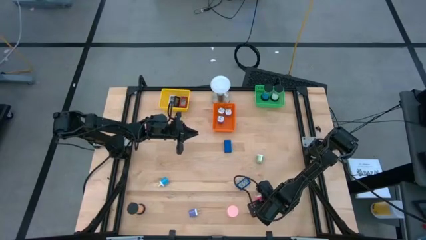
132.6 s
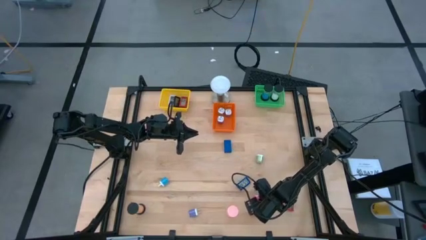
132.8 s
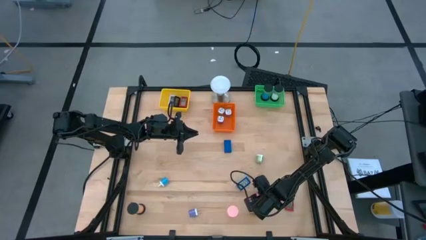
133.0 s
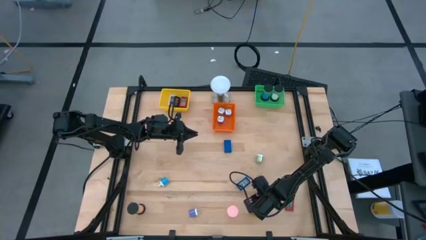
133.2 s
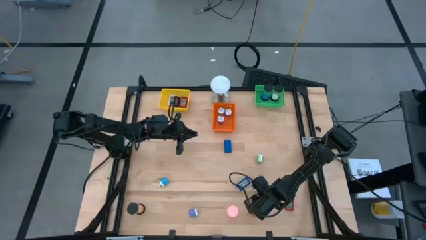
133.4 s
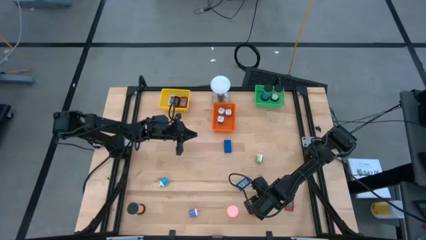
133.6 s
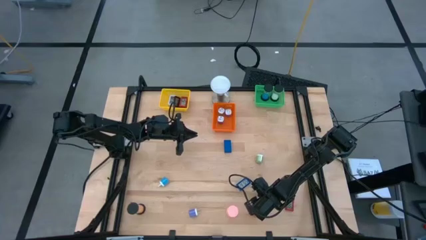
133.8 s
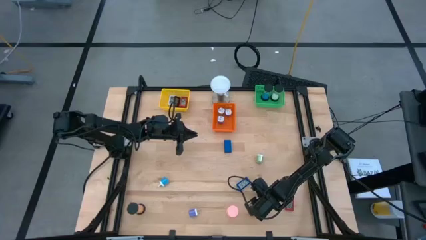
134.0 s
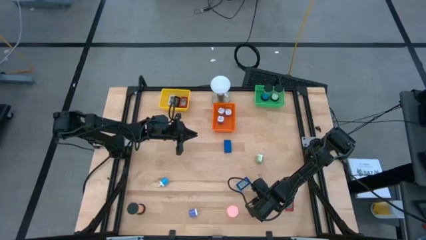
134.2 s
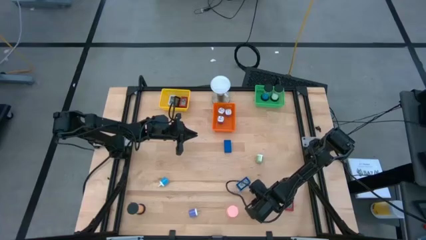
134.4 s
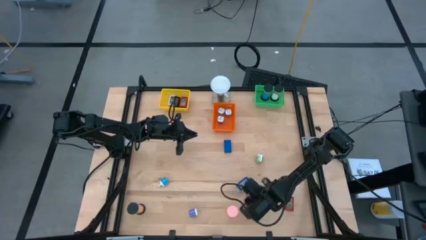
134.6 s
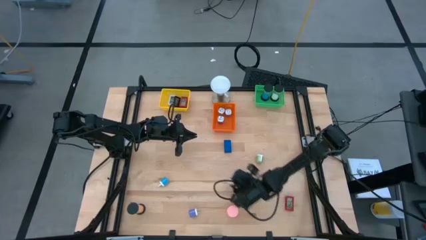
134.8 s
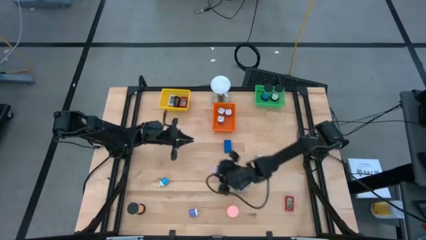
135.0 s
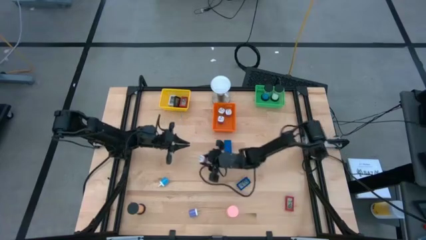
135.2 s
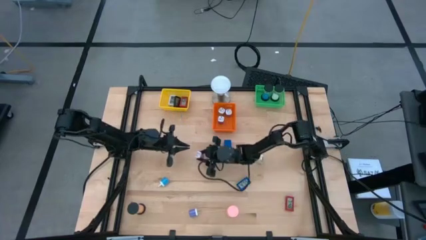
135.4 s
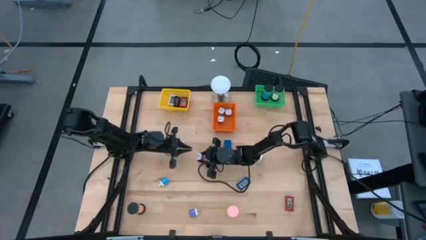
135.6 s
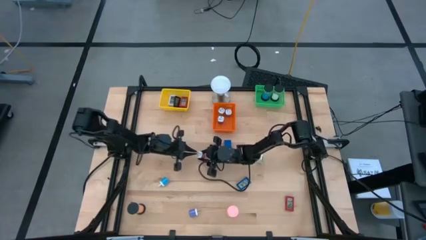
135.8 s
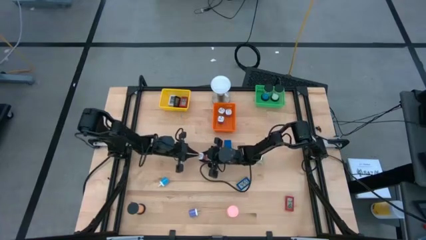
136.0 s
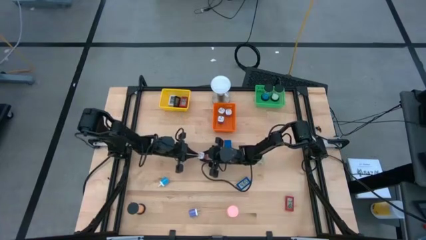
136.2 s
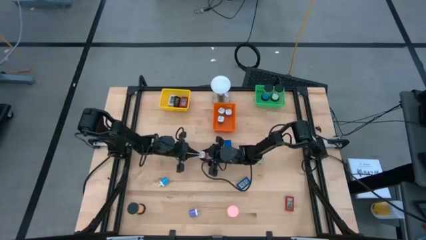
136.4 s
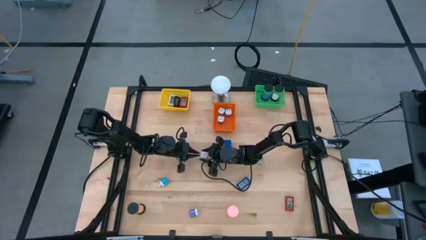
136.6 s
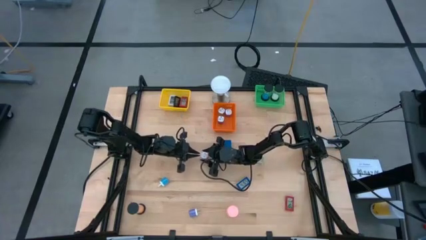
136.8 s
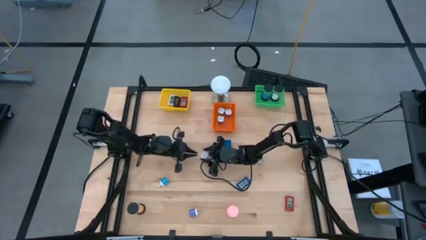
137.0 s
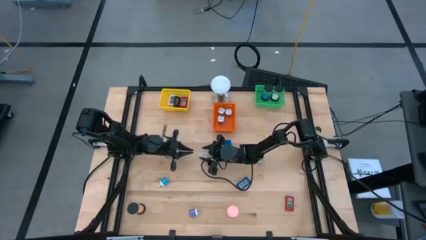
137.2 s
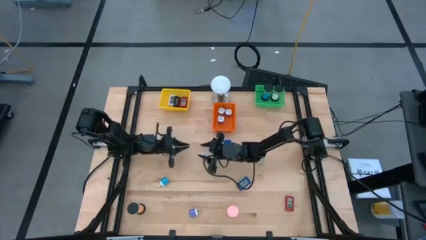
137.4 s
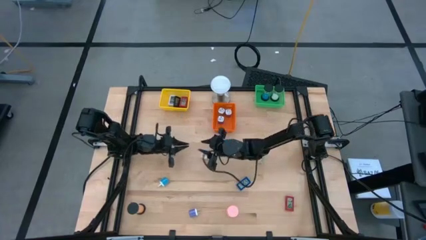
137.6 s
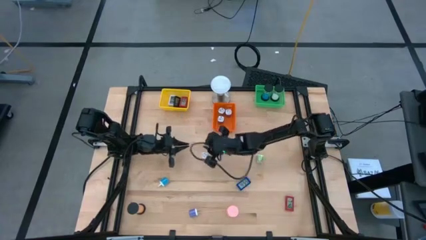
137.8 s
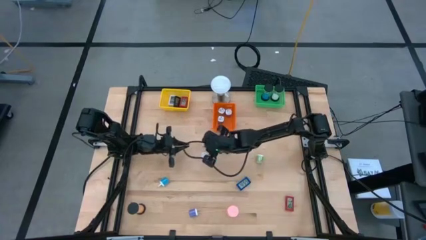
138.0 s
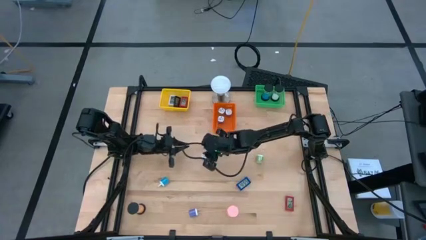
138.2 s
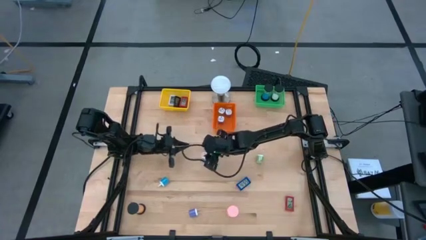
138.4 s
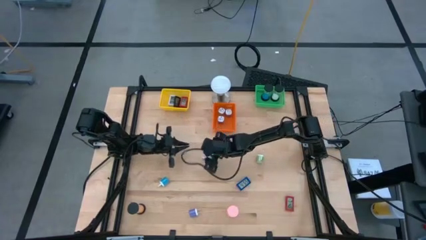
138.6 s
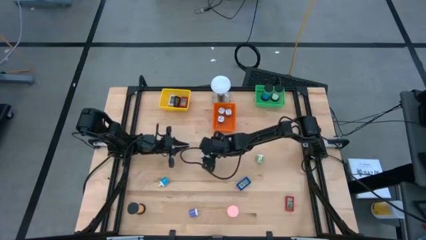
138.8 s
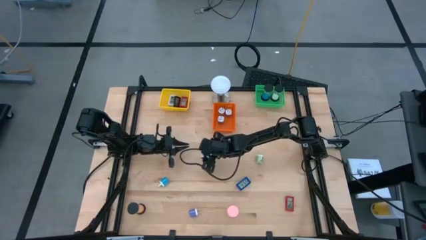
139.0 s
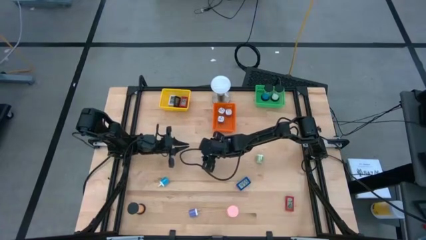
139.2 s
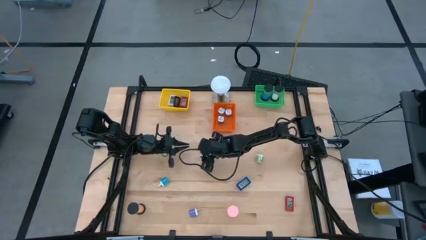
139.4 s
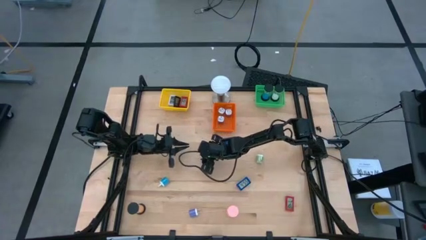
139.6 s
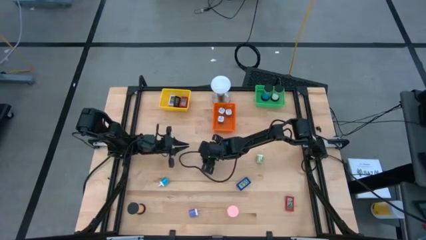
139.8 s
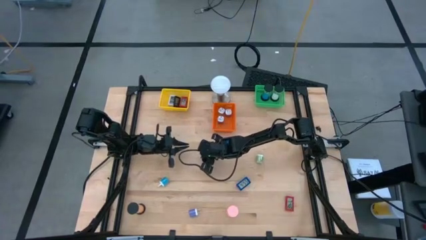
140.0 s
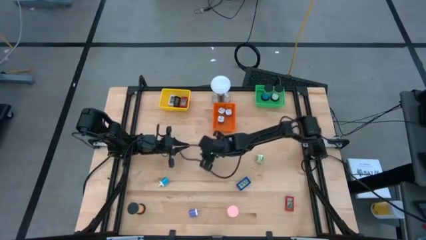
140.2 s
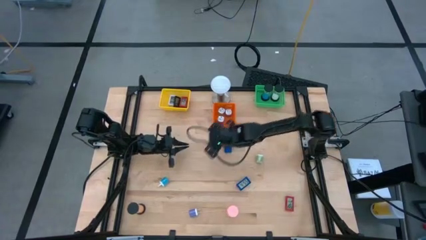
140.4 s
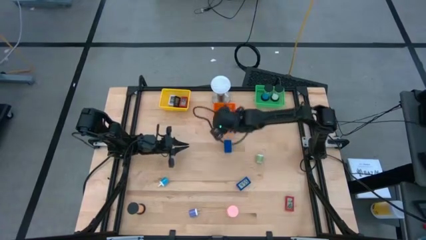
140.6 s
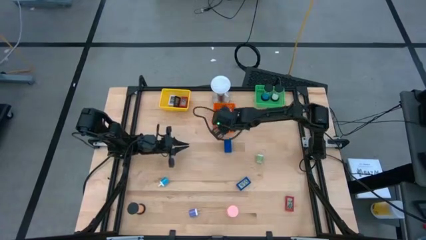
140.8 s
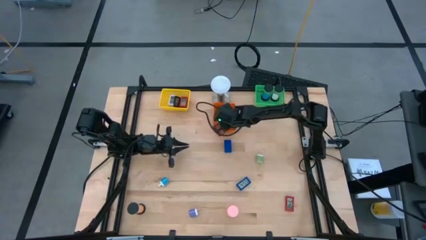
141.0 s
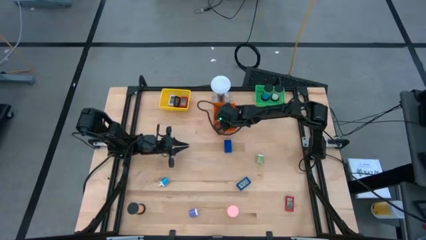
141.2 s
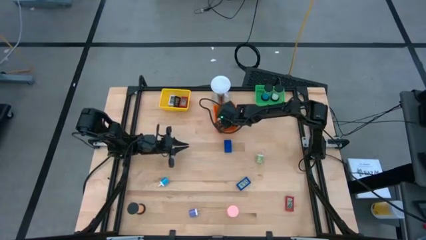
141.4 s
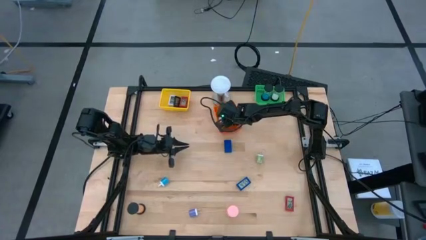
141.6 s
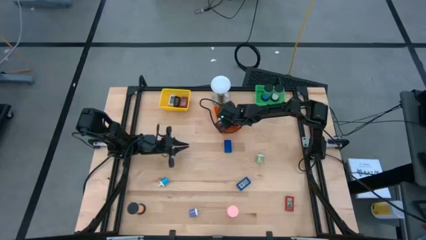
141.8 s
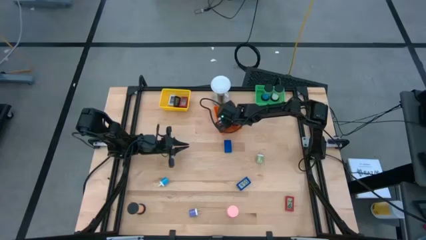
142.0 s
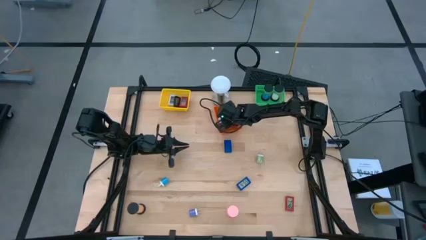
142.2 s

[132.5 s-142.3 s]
Task: Pick & Place Office items
Put the pink charger adapter into the orange bin

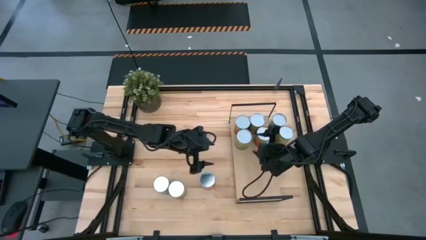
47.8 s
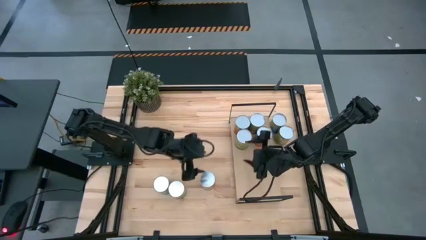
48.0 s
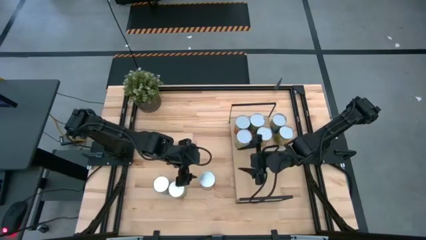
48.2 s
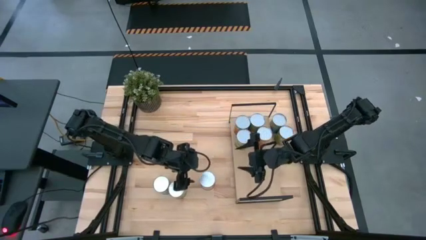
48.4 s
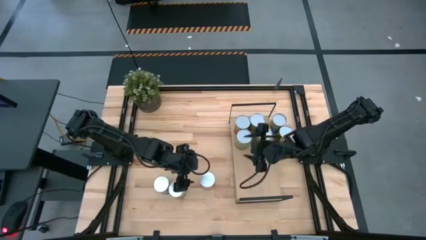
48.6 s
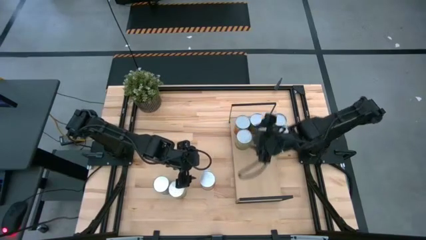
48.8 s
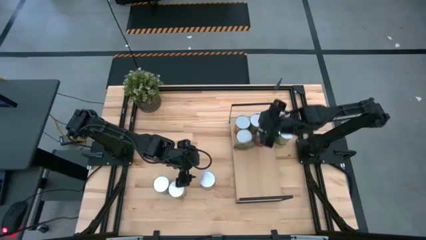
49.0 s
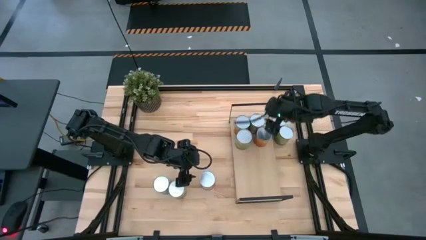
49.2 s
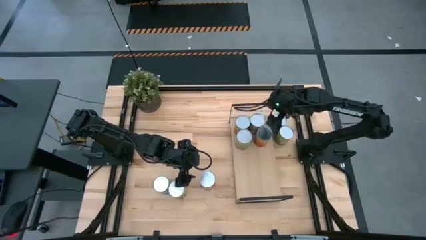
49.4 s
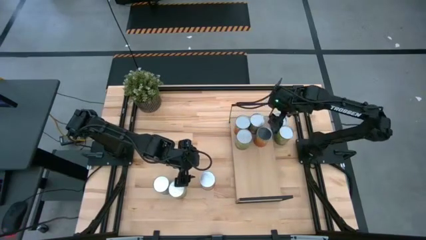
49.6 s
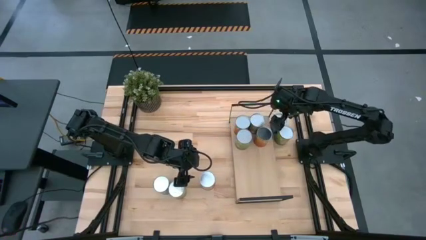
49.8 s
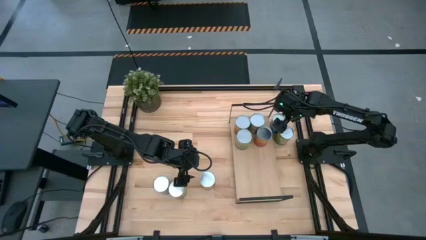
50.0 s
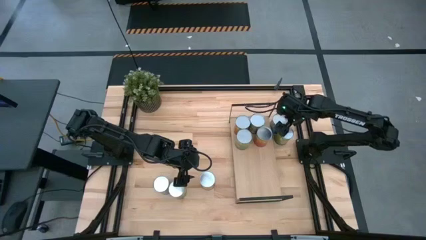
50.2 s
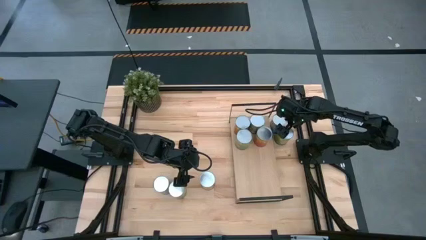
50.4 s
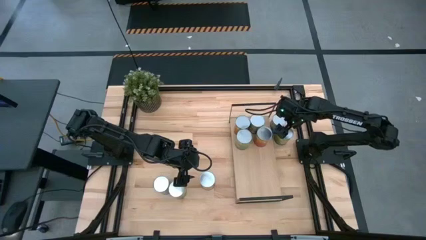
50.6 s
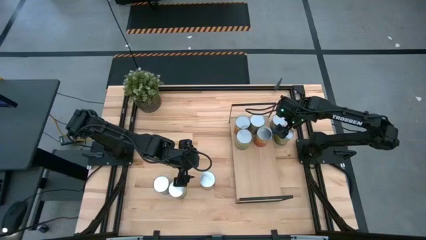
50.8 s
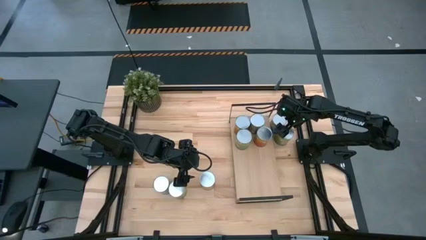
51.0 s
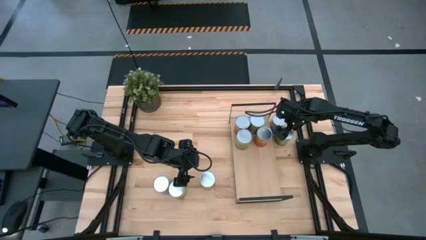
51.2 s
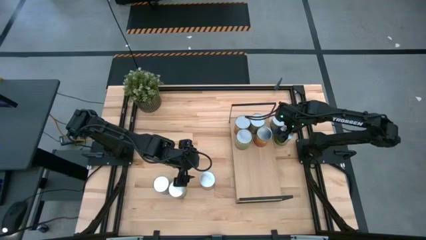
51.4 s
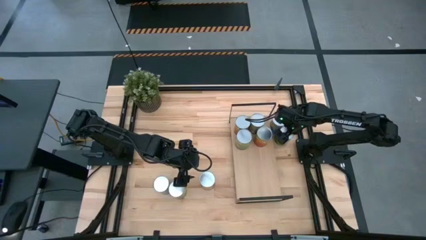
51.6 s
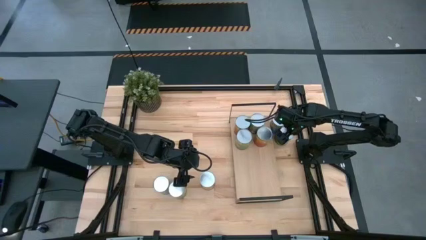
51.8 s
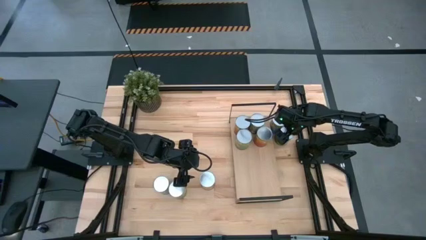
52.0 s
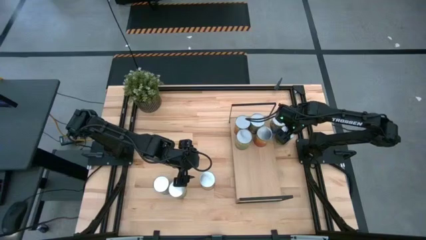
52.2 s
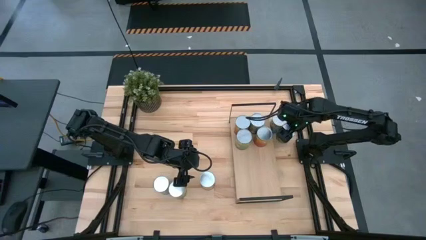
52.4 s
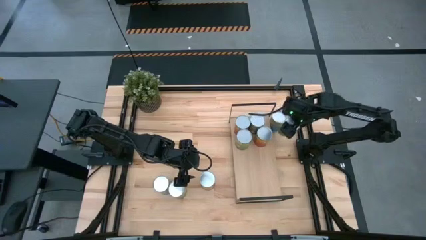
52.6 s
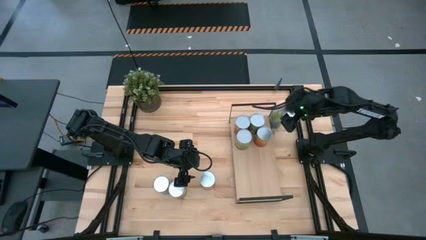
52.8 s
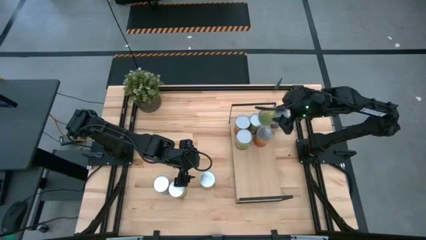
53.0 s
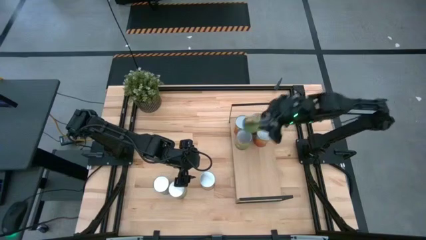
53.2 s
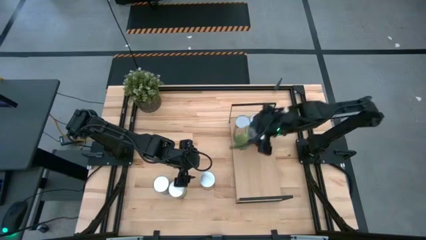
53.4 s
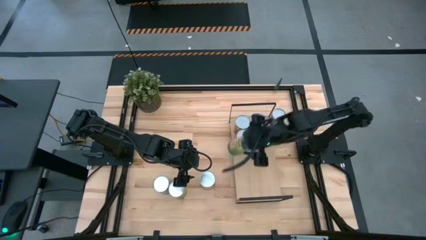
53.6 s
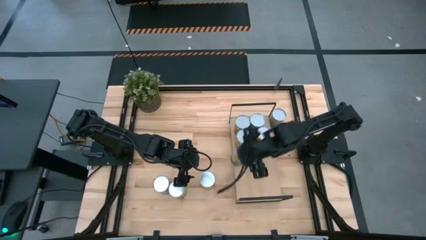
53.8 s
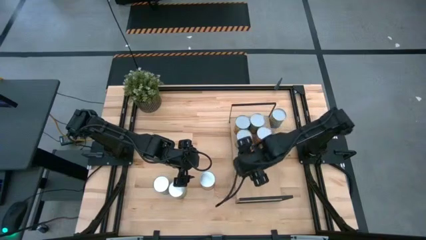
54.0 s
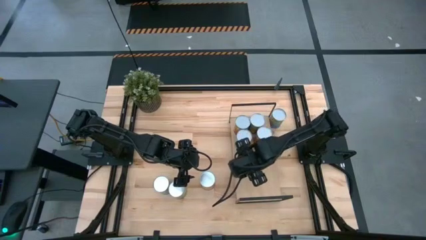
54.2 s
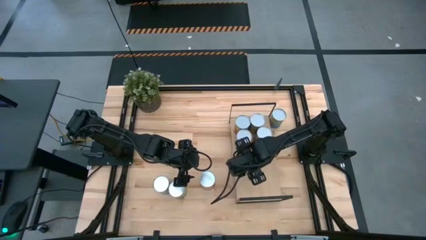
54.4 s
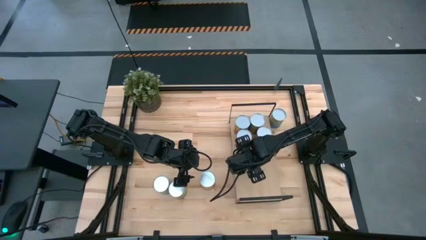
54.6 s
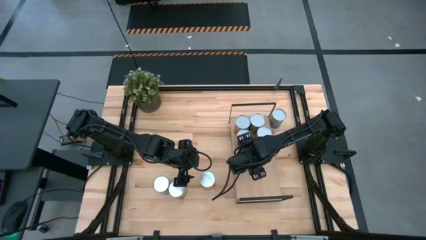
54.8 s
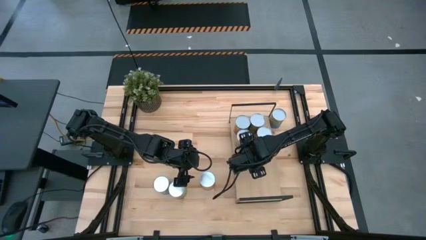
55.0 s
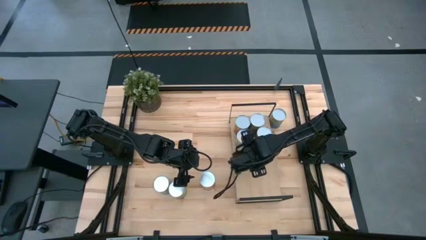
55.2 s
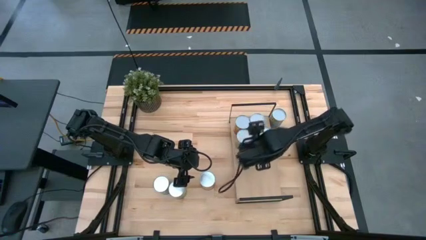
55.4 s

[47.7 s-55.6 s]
Task: Pick and place cans onto a shelf
Put the canned orange on the shelf
